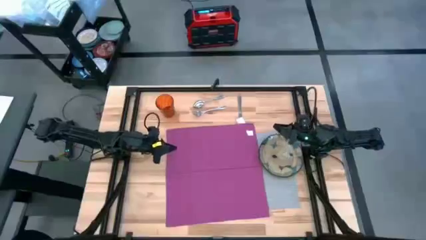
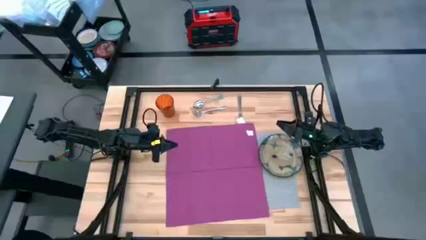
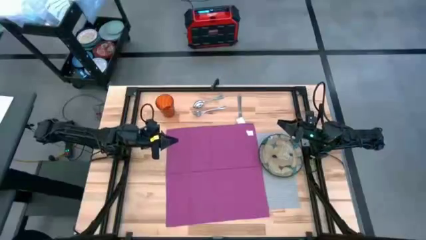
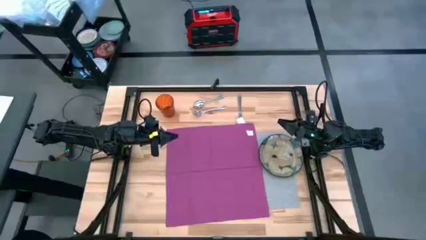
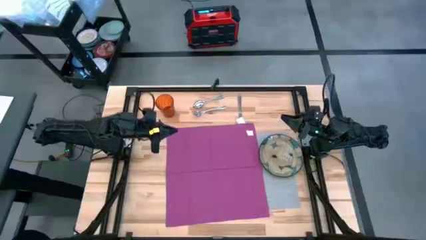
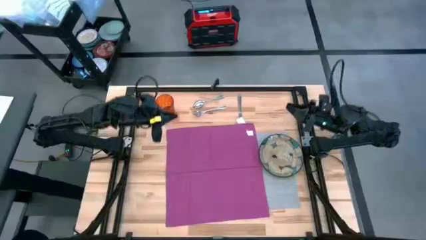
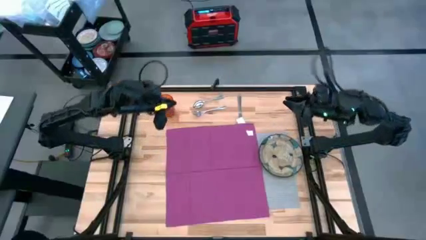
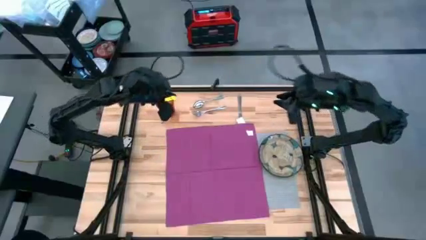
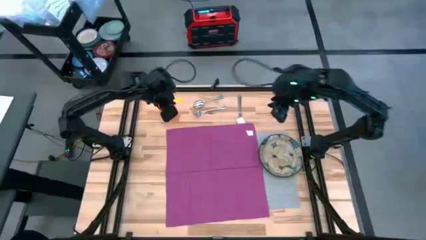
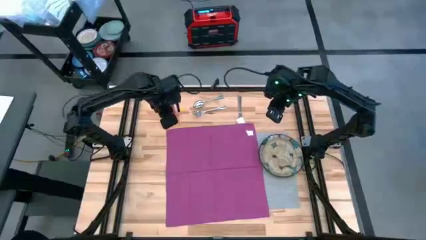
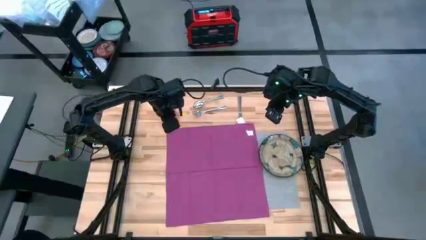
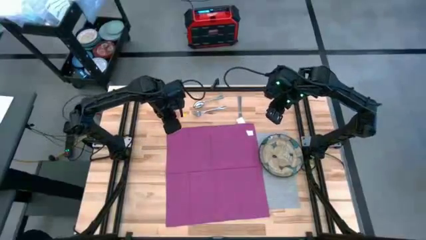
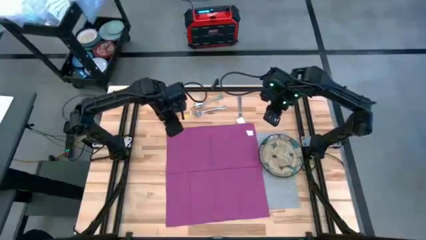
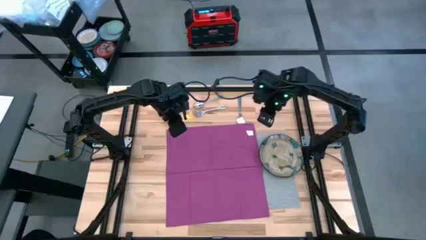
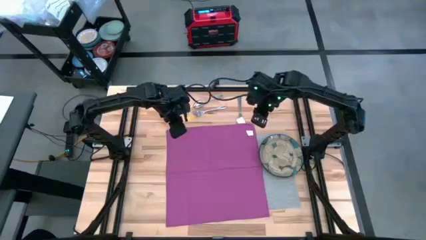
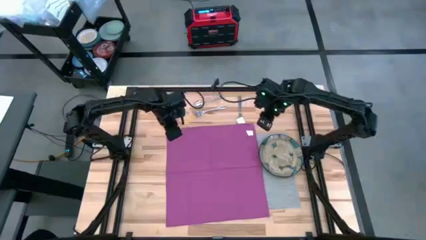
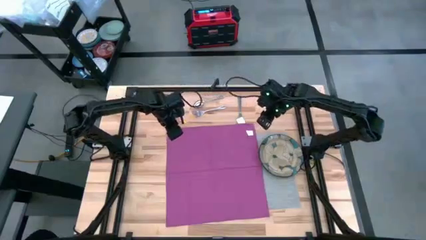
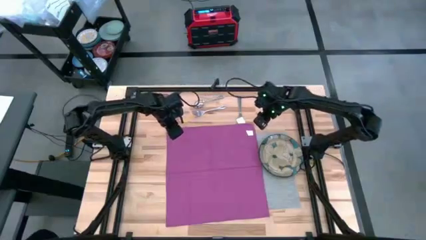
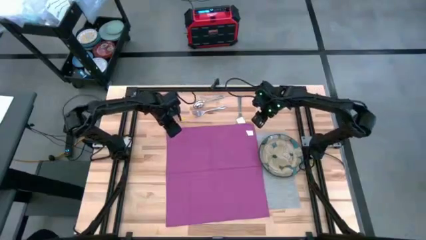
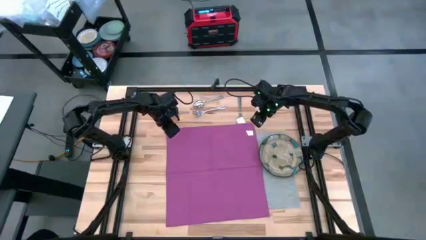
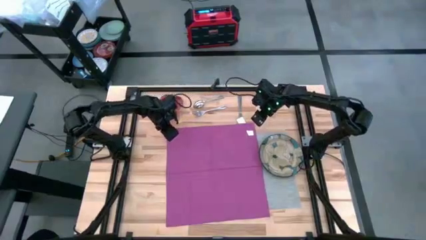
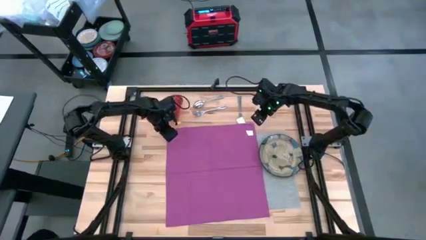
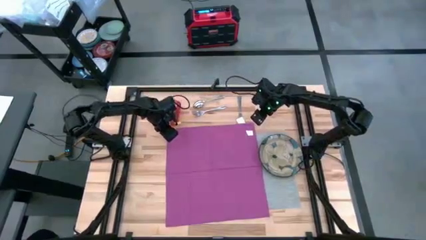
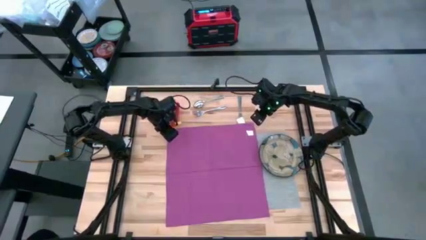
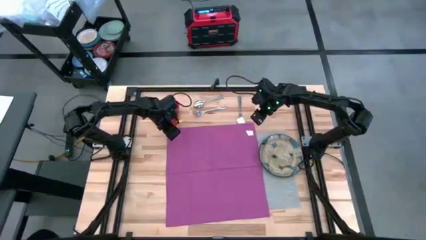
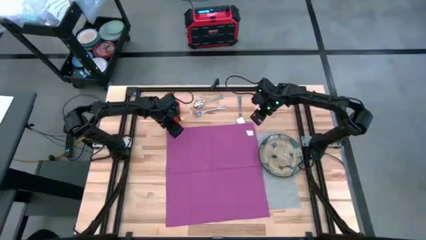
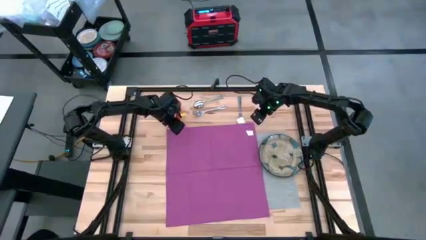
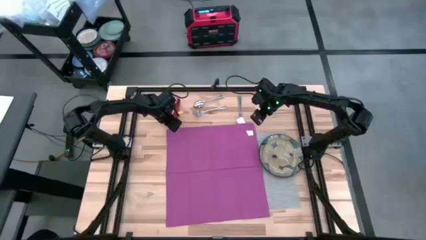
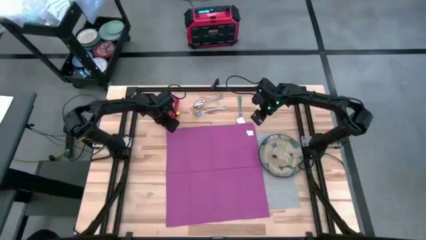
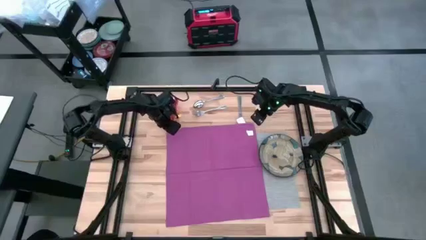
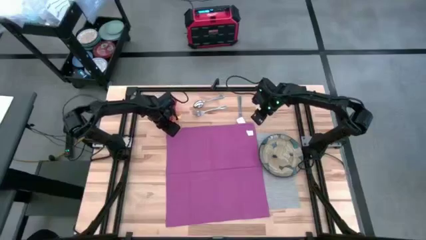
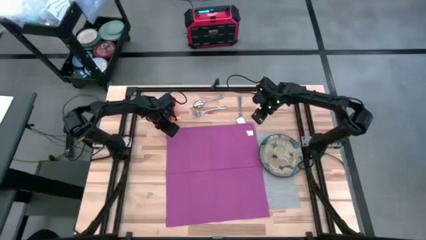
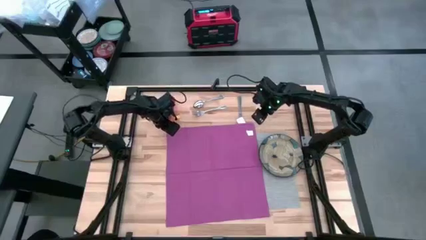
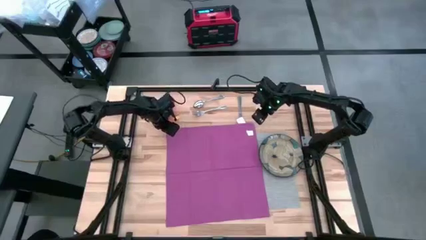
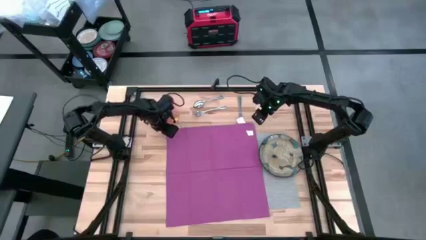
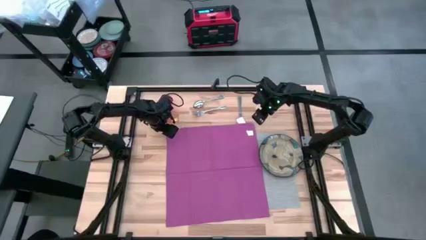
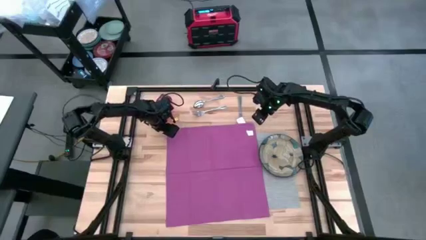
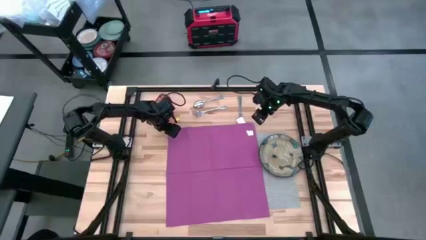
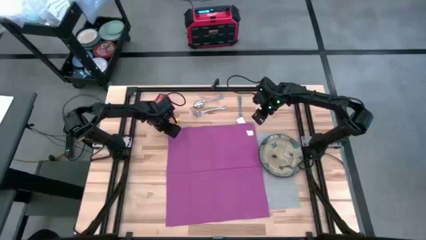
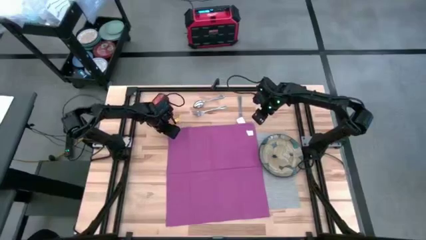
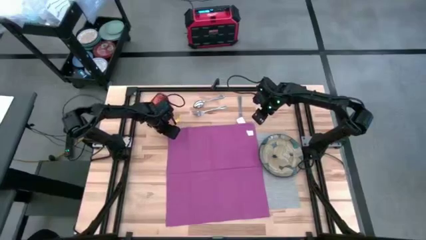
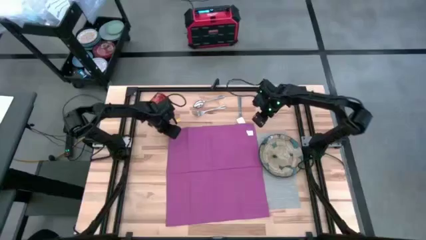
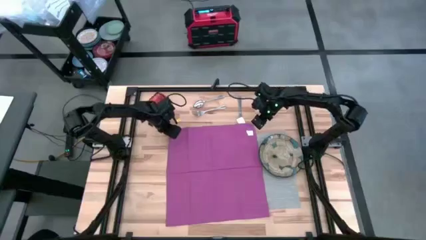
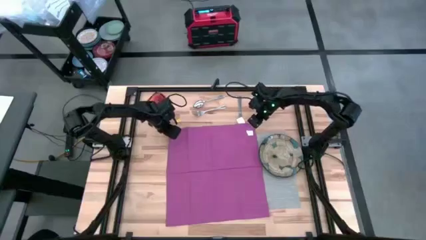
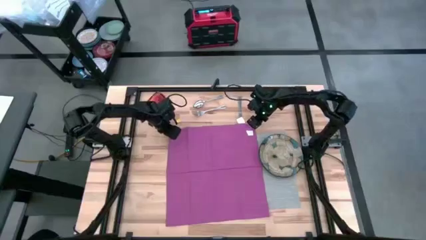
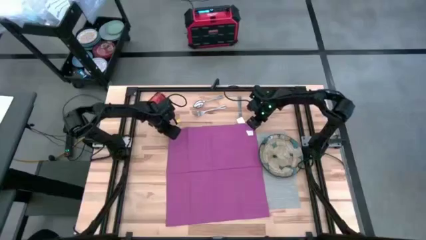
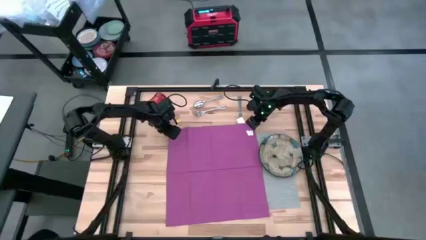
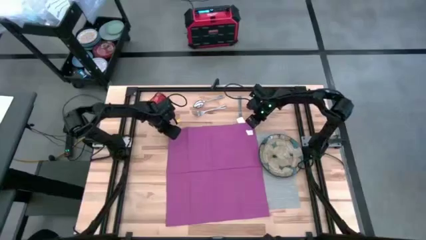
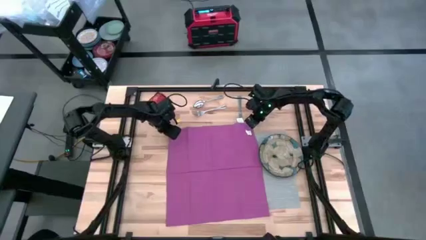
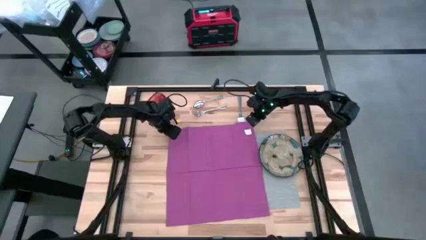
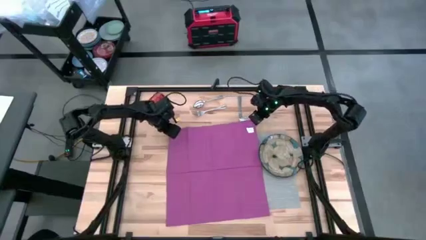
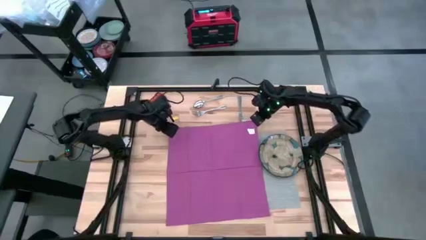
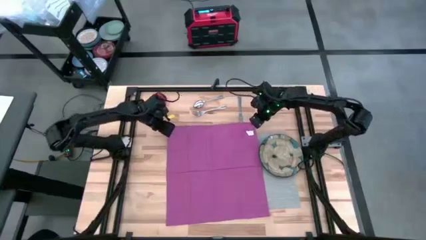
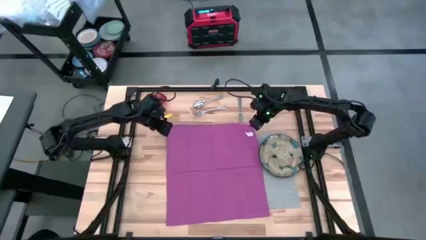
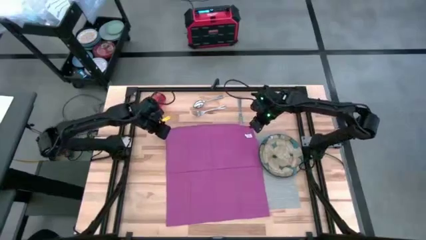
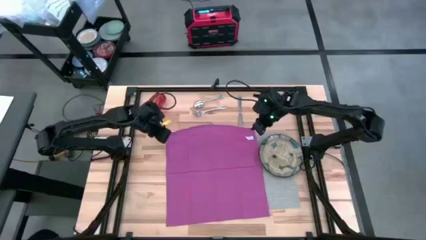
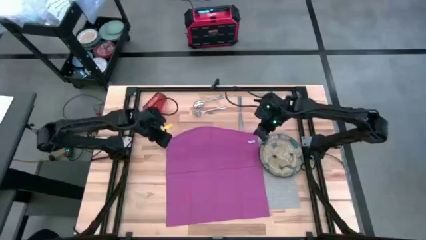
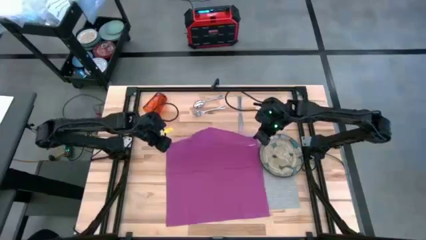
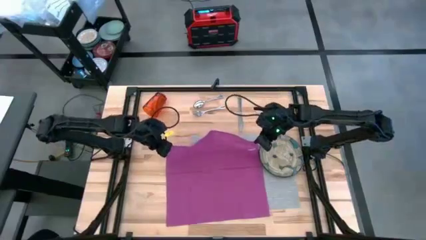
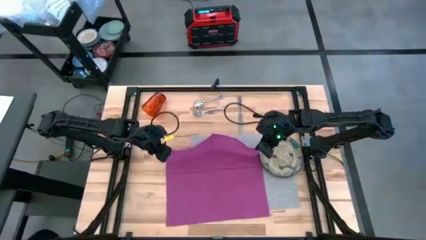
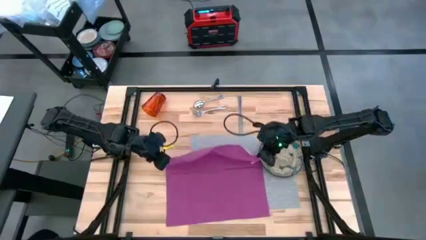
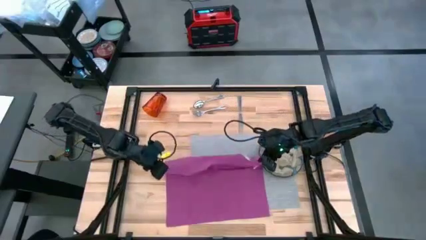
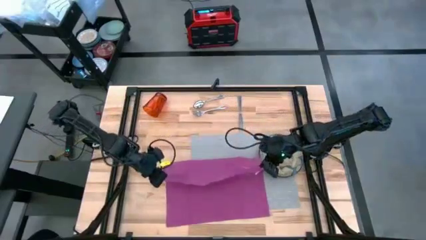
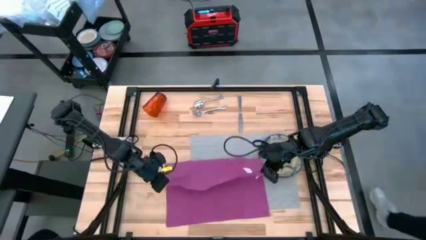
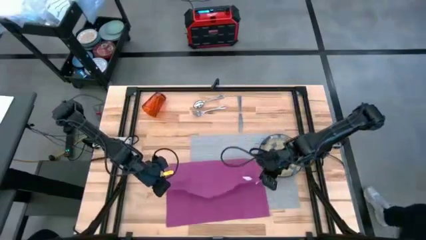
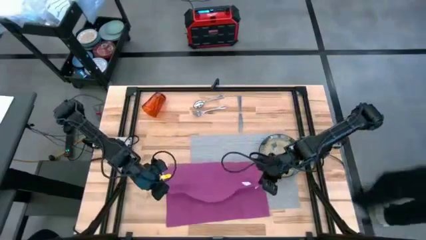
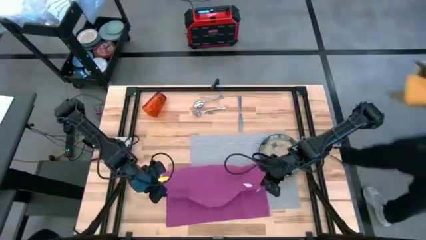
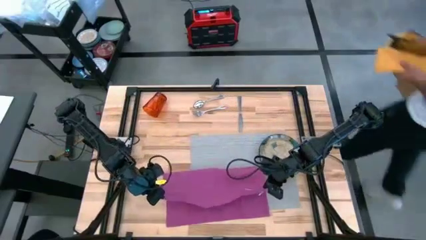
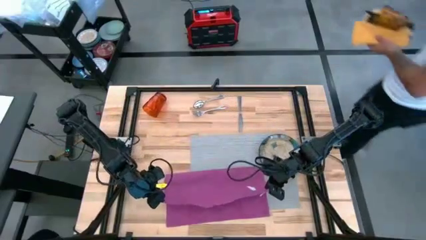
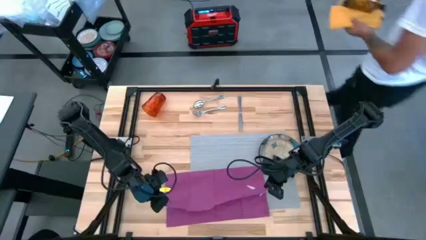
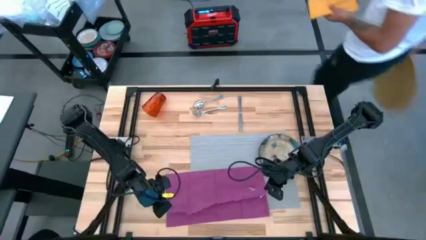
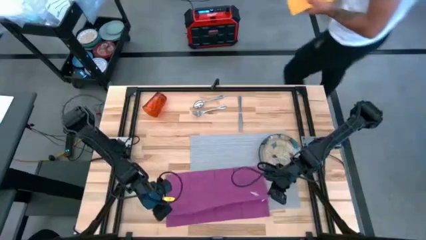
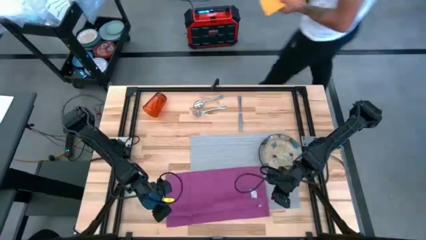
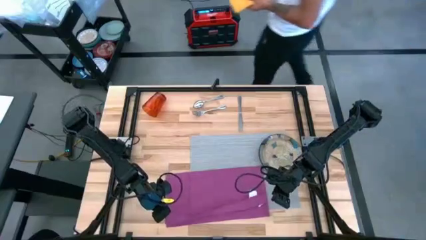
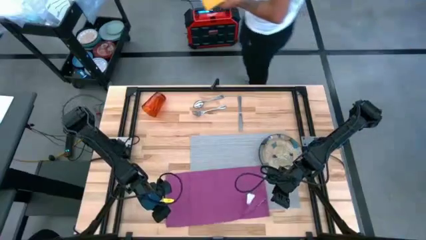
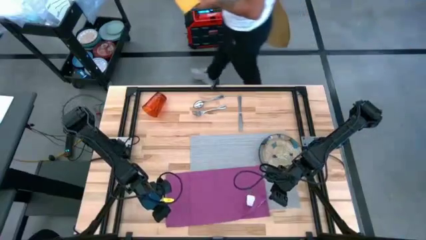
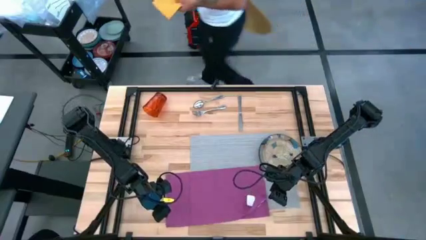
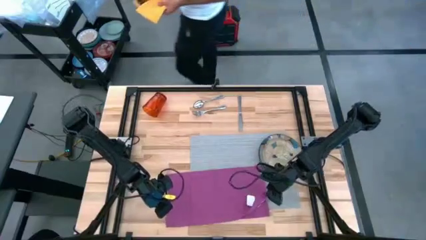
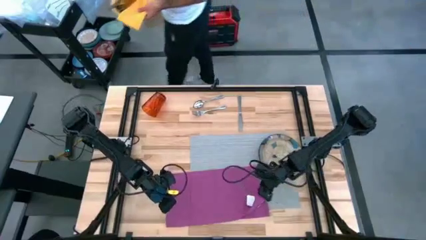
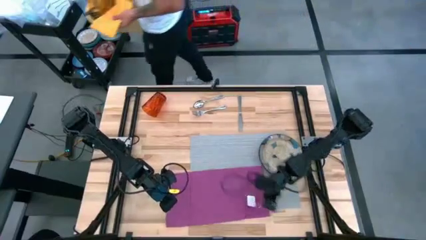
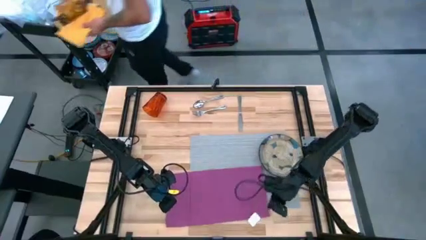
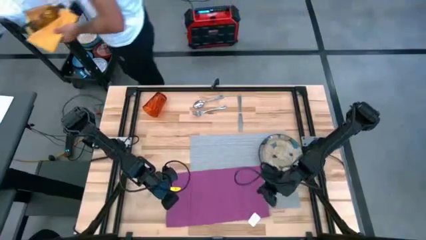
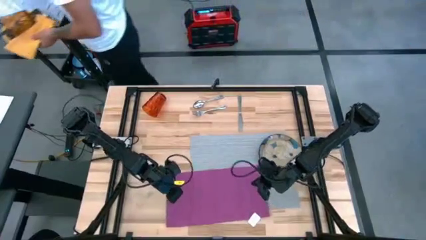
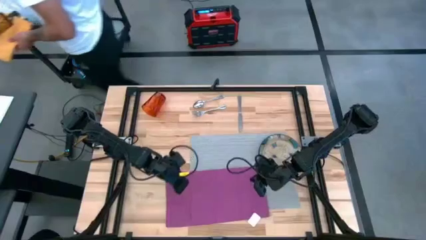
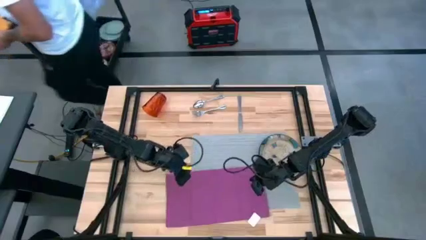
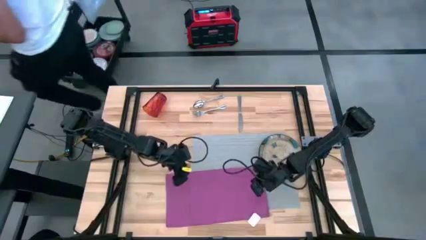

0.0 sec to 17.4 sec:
Task: Set table place
Fold the violet table napkin
